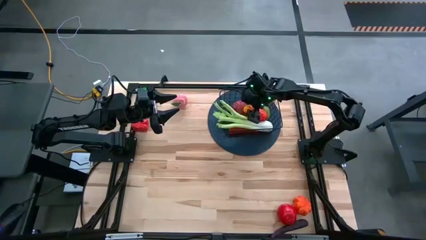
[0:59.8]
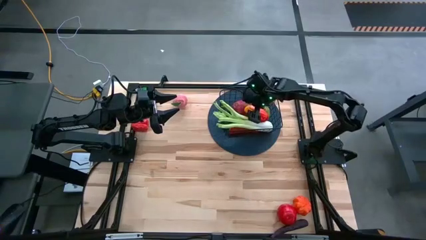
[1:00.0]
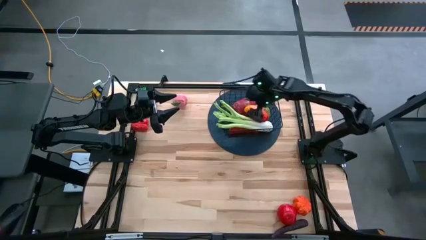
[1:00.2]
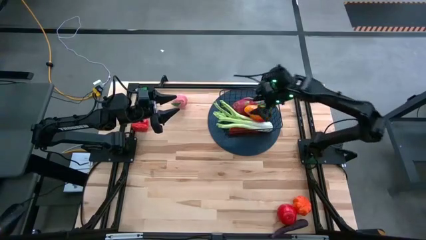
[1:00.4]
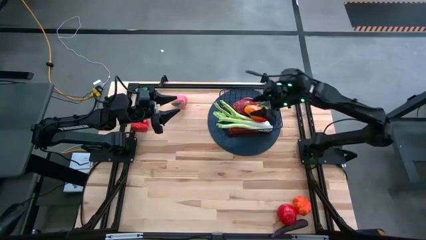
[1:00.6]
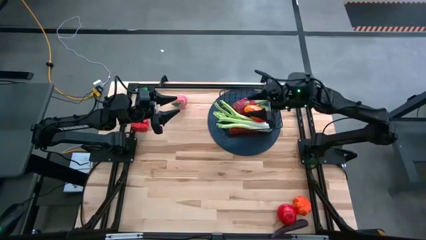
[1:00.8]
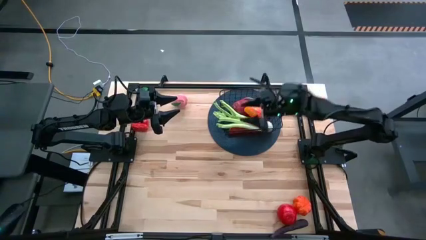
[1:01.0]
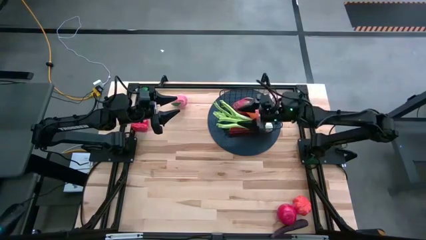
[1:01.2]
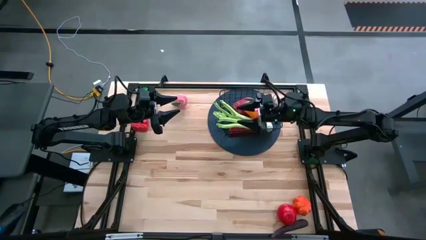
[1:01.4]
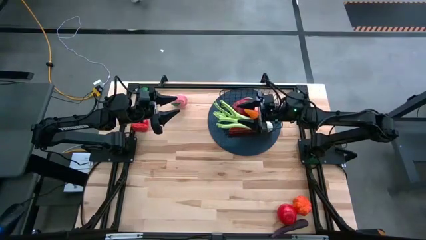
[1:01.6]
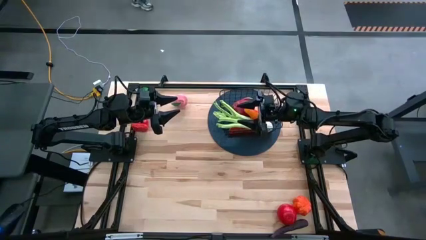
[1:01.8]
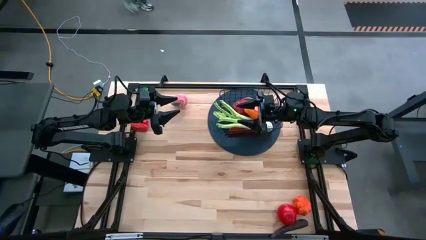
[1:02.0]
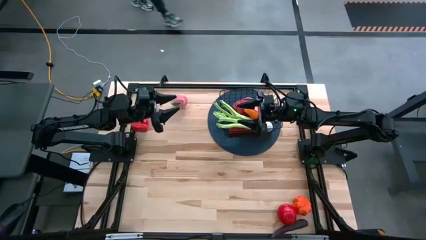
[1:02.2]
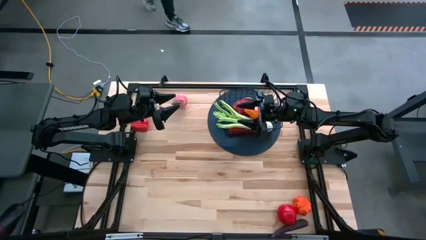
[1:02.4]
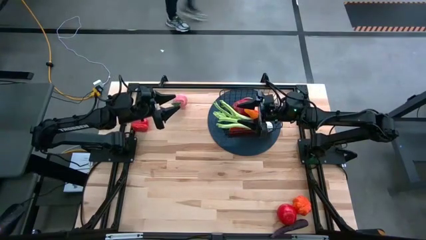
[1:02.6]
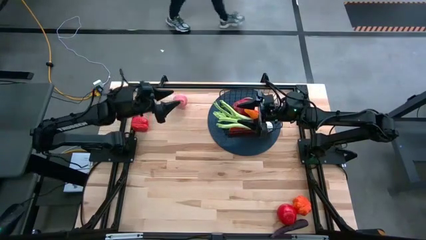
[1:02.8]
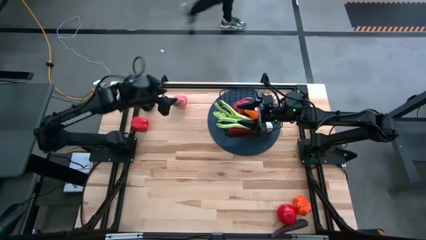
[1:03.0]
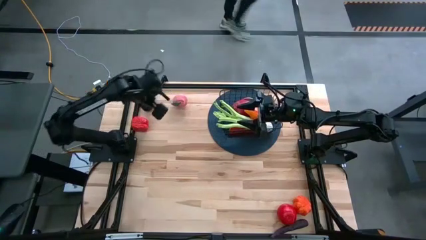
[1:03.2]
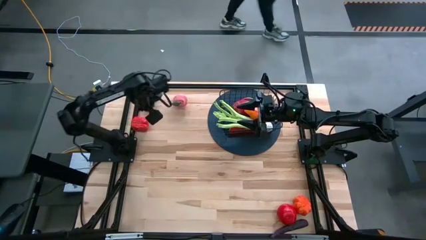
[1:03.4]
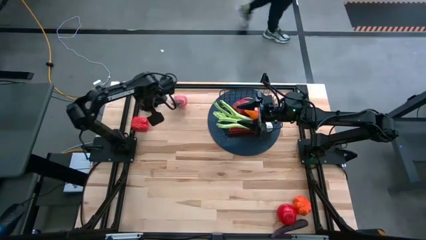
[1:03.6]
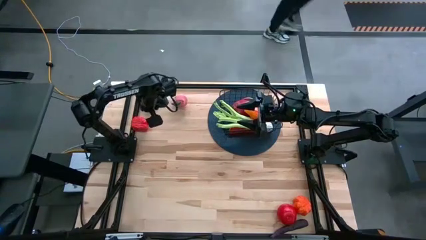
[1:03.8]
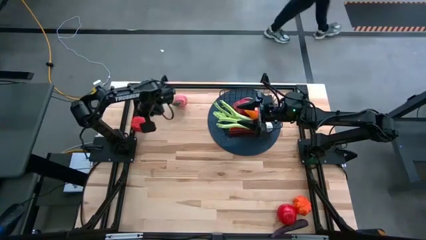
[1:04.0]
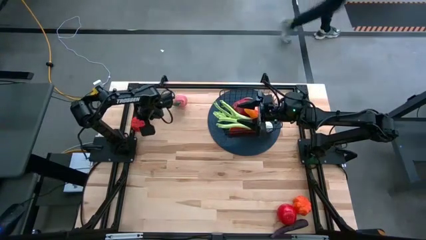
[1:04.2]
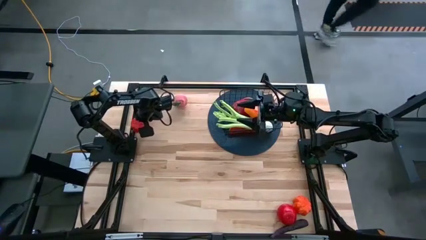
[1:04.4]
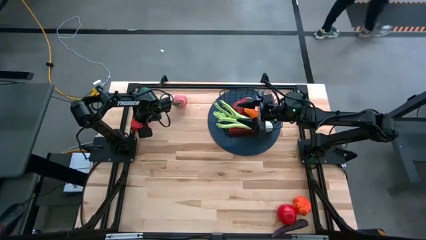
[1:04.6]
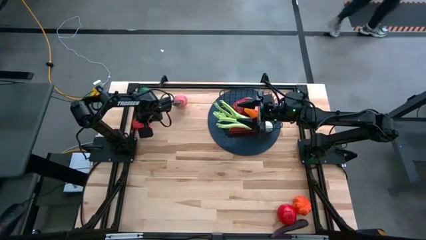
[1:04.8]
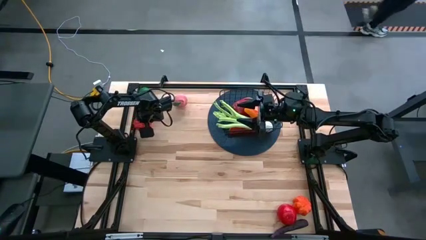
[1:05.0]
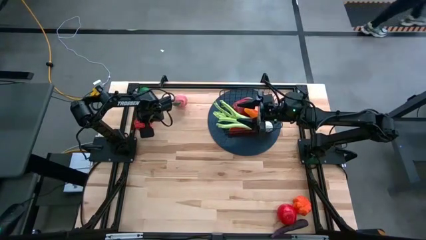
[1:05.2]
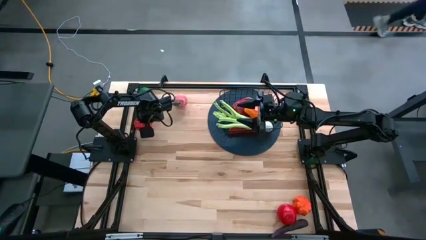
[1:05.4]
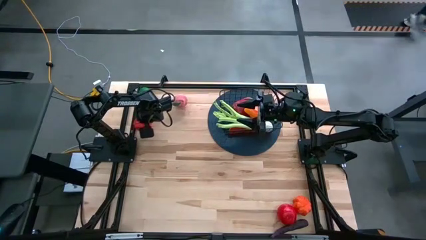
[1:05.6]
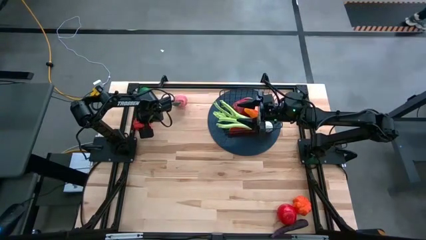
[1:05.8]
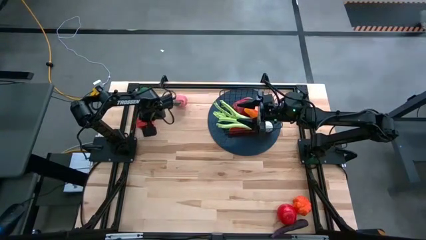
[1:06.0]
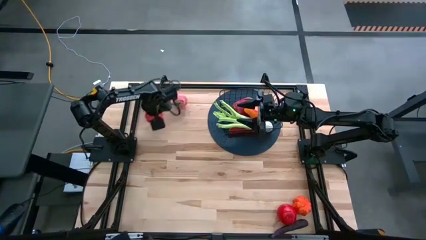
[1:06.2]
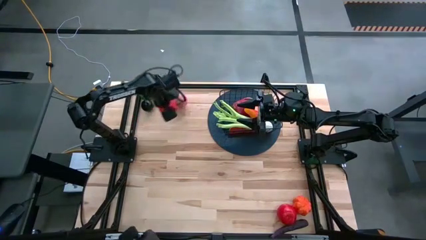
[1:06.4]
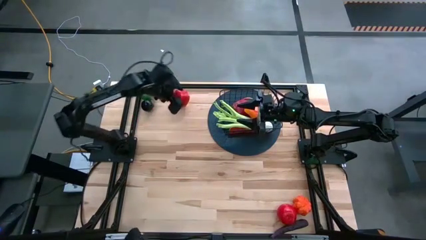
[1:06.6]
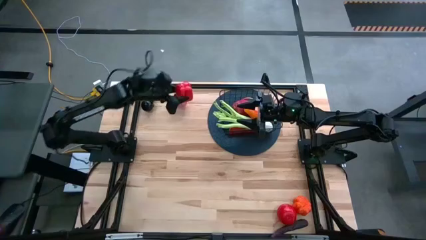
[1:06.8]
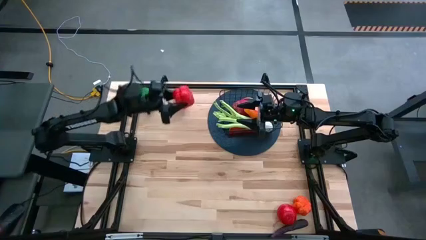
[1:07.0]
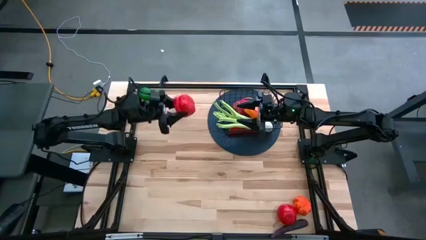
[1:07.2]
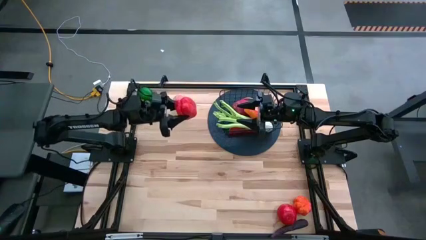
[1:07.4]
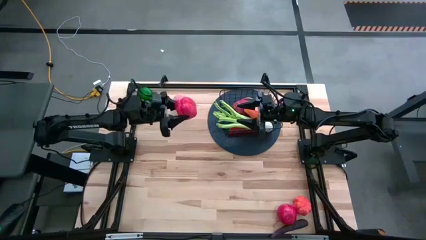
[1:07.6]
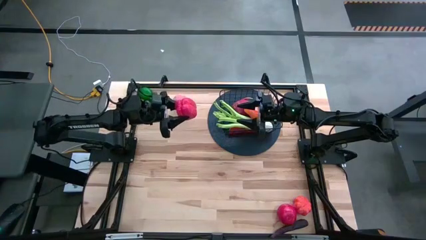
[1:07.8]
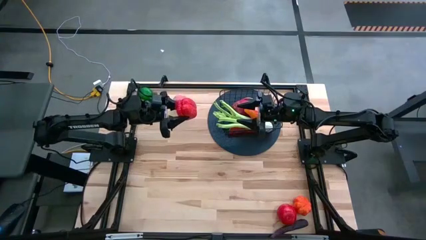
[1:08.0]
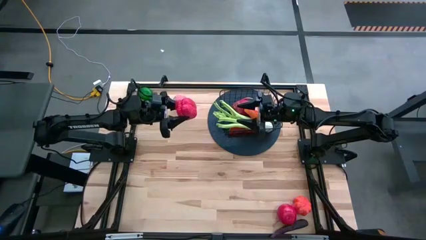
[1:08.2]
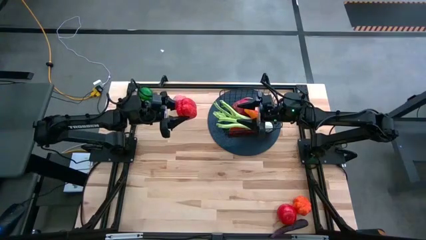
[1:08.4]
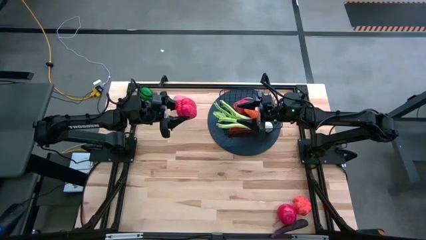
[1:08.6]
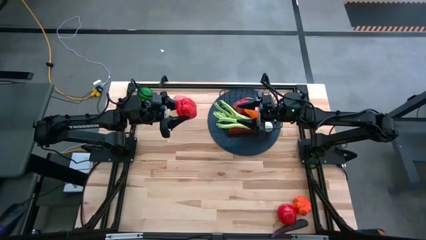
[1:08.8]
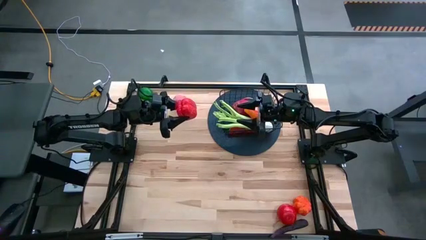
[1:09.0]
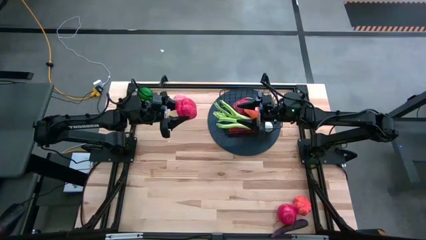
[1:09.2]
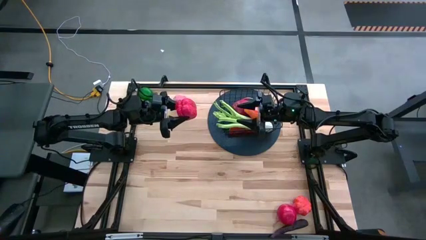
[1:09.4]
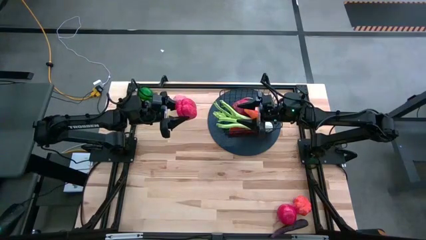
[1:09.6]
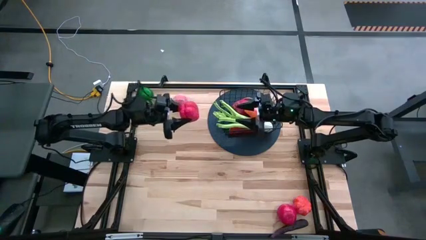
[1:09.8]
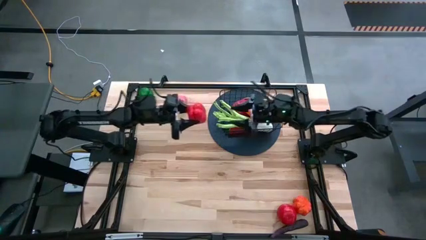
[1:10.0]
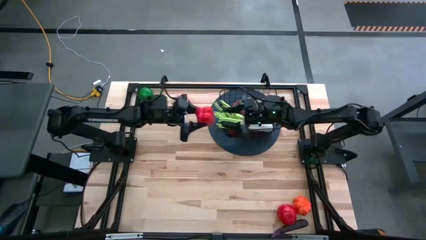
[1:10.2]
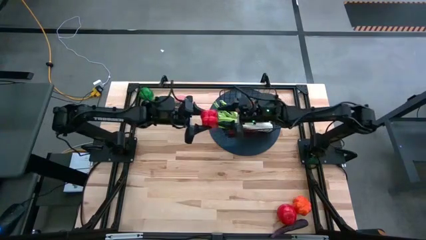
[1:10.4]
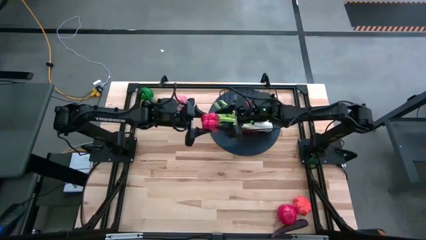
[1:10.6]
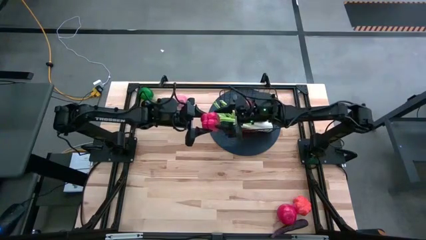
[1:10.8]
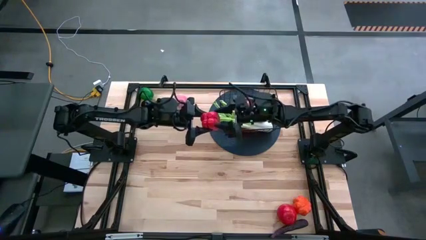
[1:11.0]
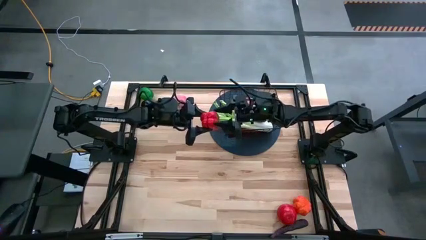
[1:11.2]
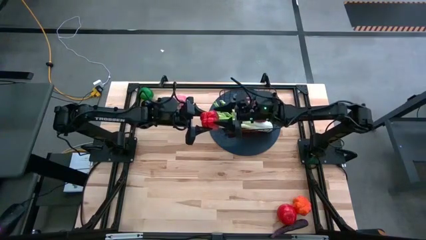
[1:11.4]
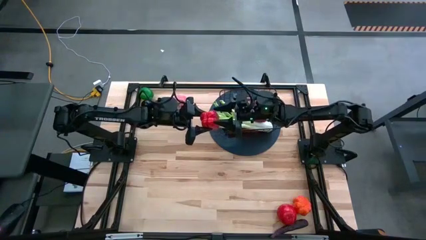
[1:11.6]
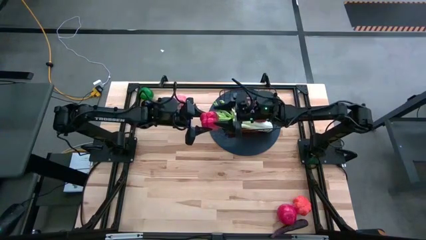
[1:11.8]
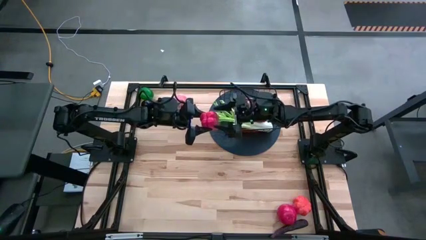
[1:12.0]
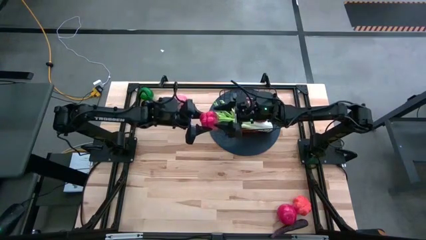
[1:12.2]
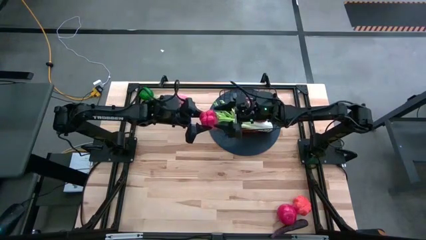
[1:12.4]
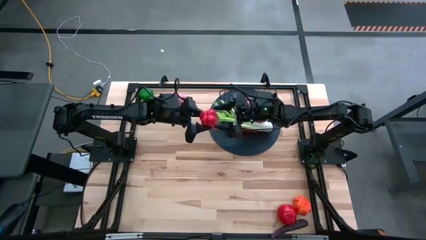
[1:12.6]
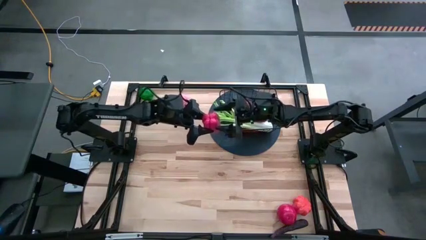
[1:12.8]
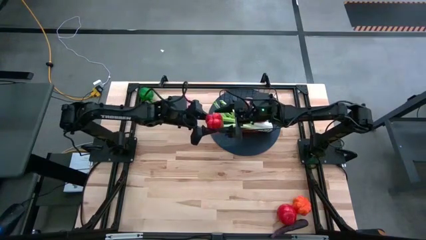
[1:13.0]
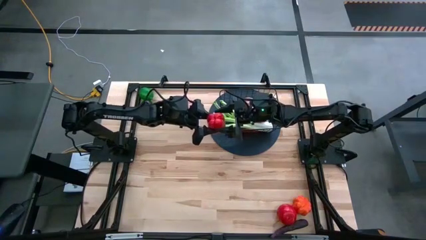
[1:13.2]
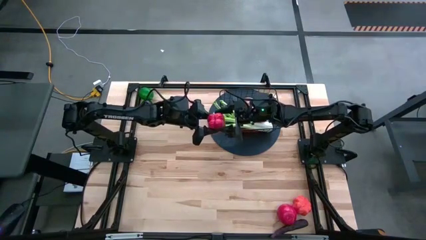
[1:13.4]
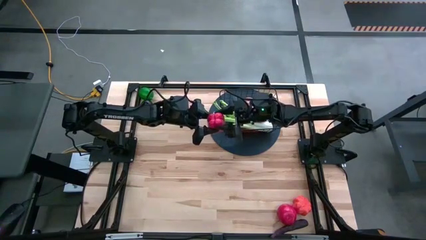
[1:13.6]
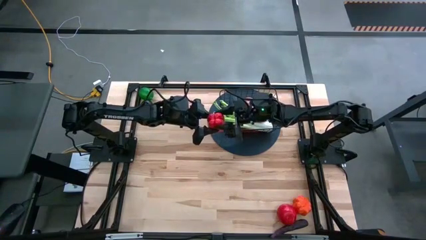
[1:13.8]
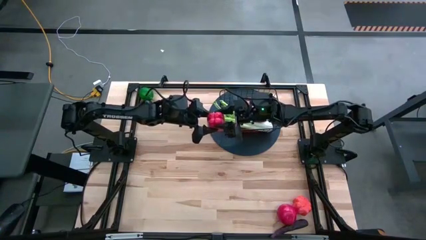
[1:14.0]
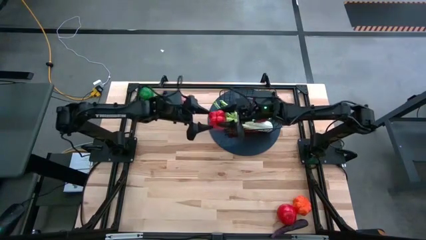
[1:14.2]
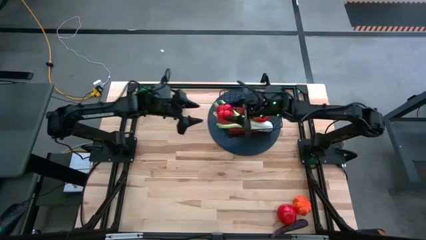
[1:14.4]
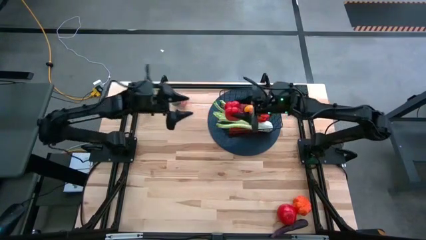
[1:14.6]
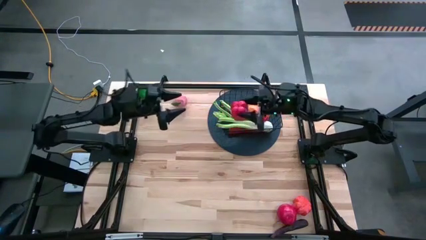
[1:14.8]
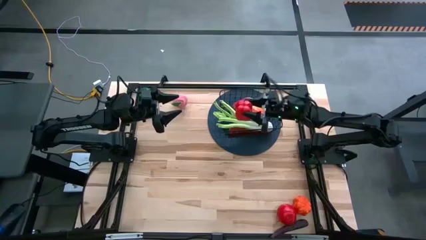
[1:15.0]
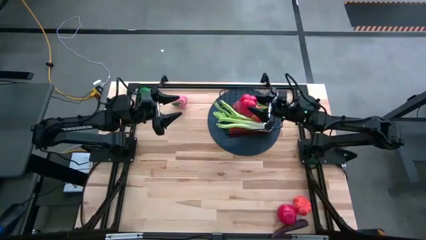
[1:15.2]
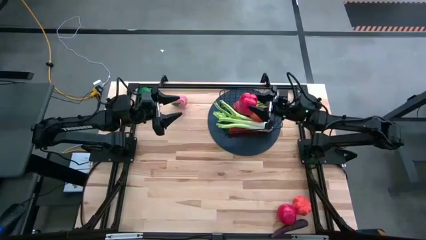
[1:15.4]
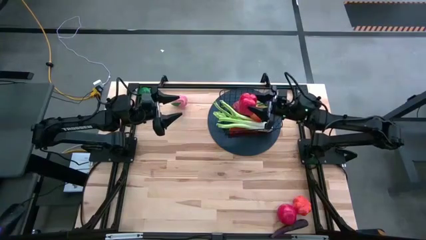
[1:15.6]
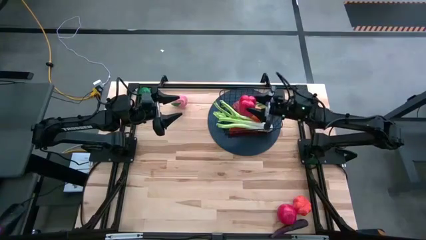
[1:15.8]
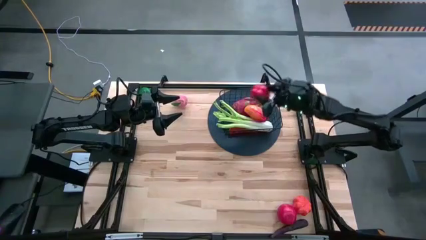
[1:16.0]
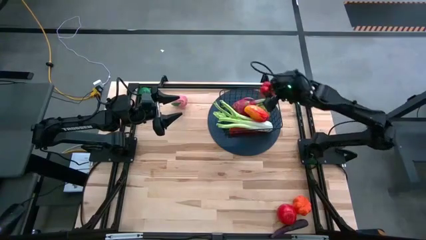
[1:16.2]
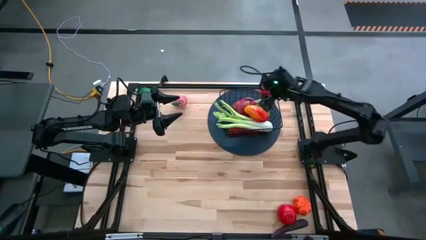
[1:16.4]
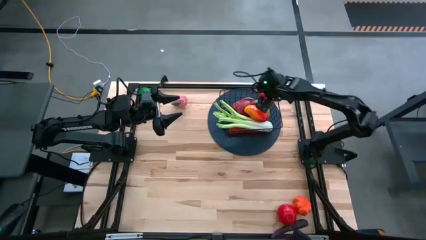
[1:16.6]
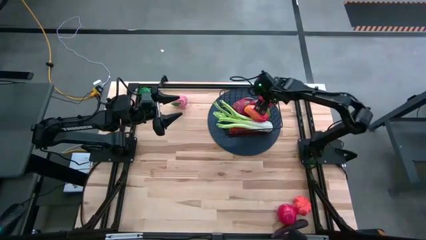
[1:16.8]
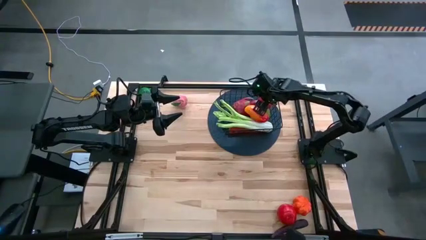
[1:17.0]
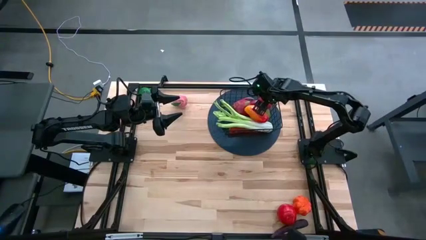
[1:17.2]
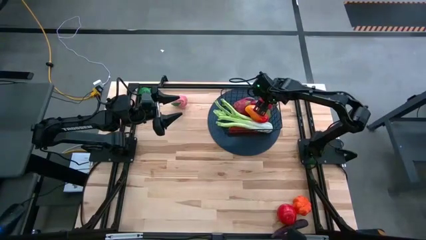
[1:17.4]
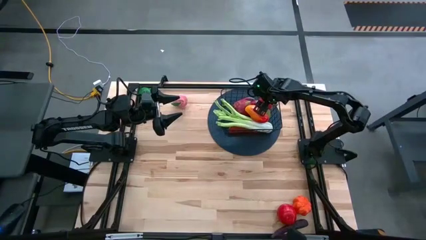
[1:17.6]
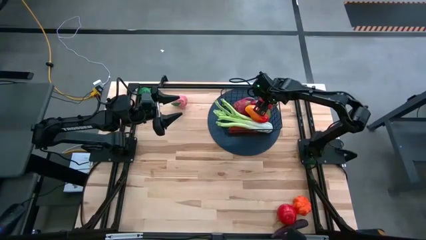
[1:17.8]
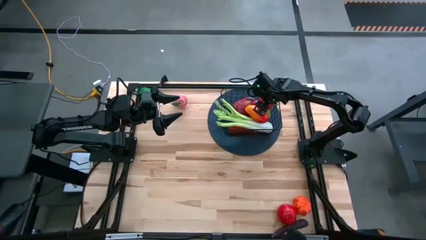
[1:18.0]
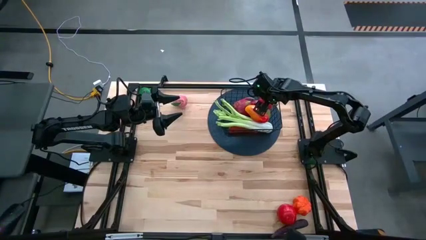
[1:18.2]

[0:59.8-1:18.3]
Task: Build produce basket
Put the red bell pepper into the black wire basket
